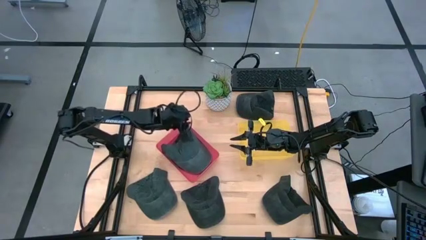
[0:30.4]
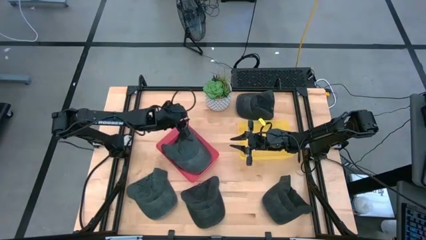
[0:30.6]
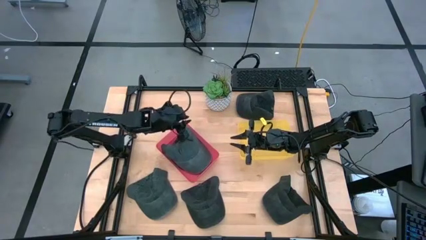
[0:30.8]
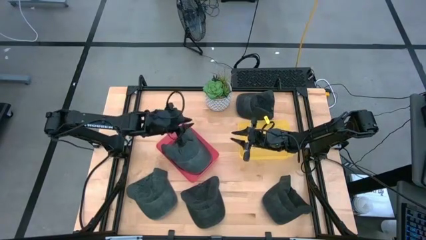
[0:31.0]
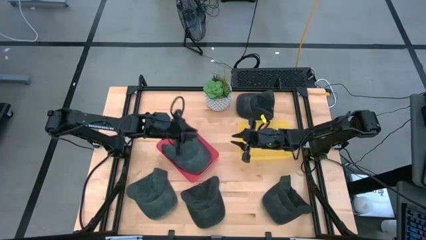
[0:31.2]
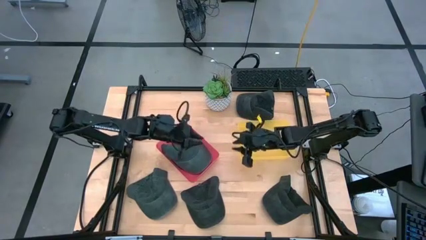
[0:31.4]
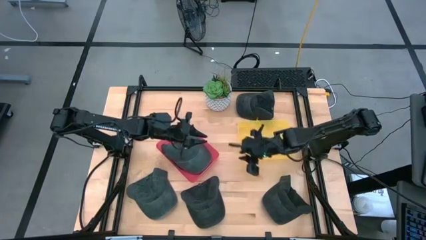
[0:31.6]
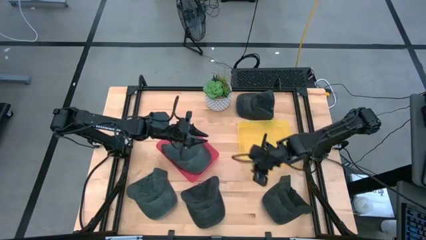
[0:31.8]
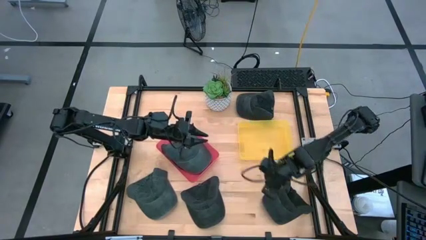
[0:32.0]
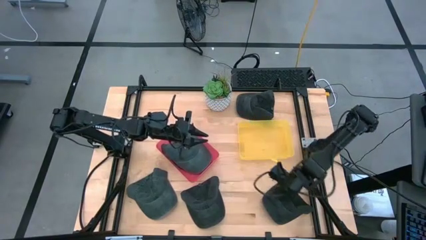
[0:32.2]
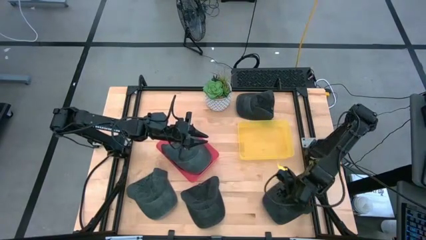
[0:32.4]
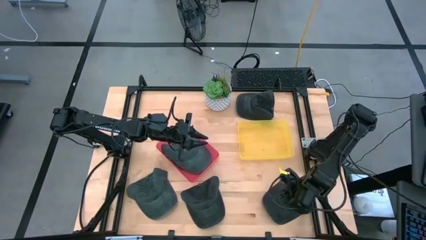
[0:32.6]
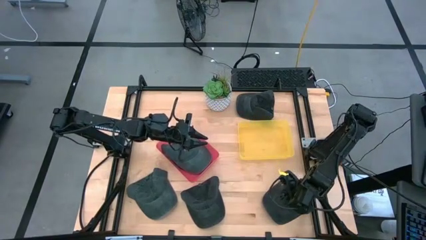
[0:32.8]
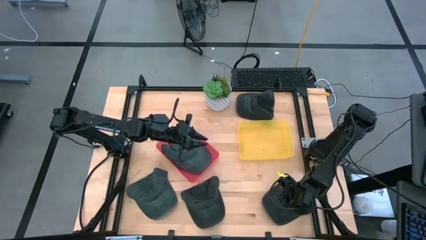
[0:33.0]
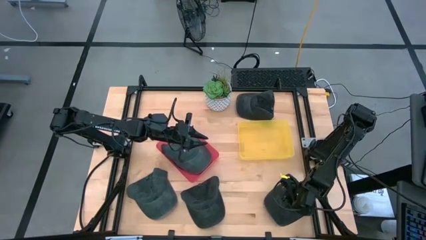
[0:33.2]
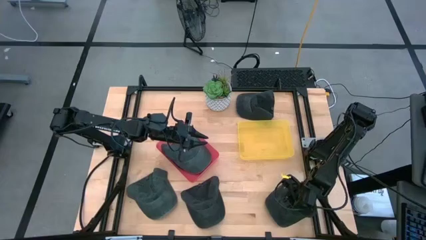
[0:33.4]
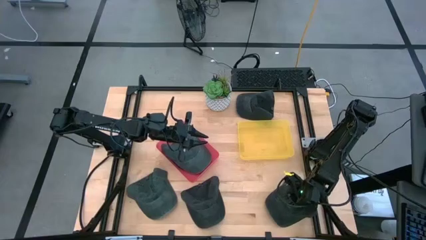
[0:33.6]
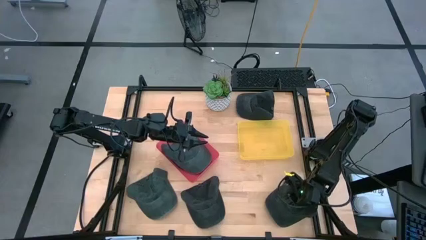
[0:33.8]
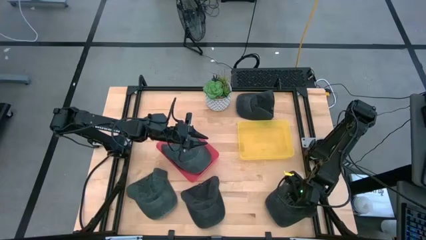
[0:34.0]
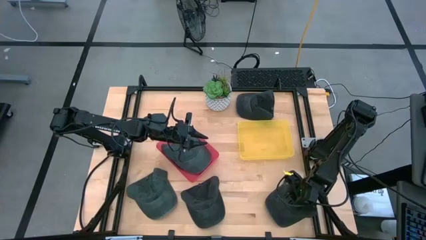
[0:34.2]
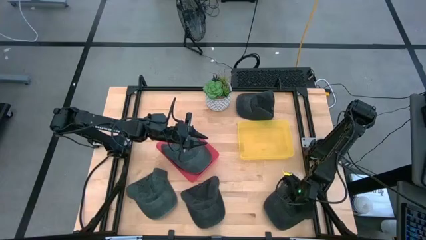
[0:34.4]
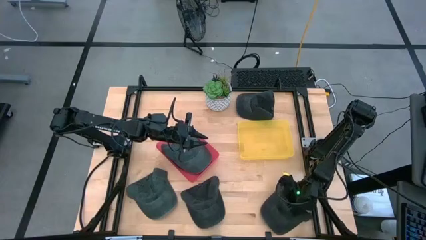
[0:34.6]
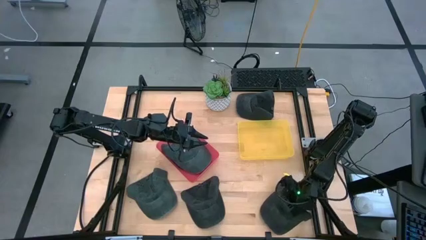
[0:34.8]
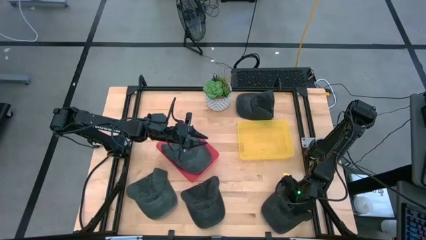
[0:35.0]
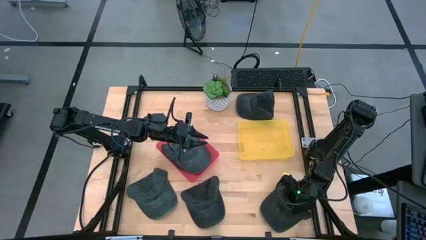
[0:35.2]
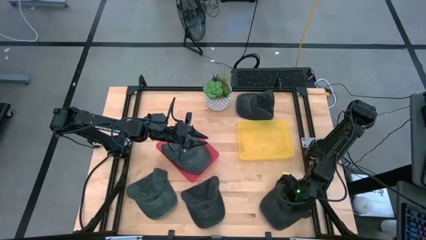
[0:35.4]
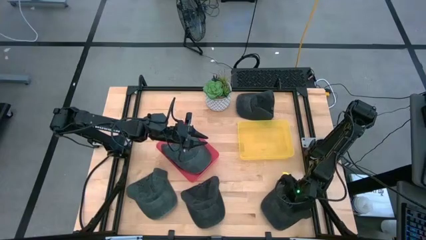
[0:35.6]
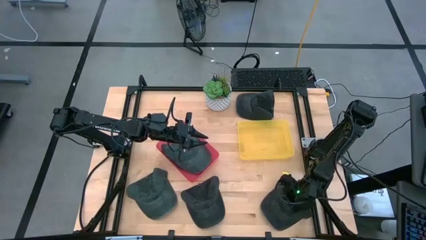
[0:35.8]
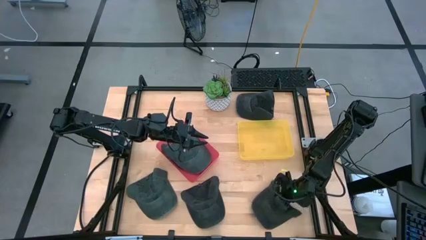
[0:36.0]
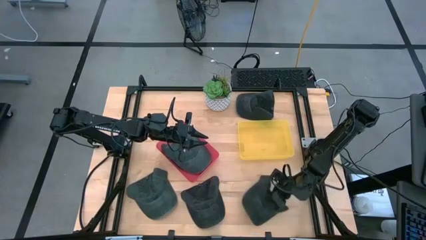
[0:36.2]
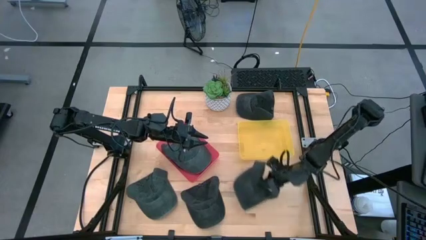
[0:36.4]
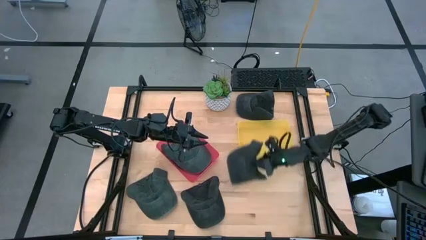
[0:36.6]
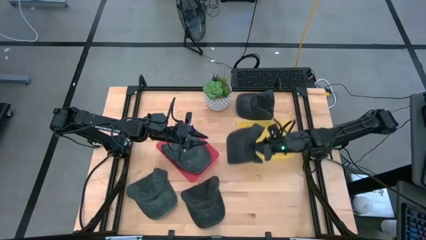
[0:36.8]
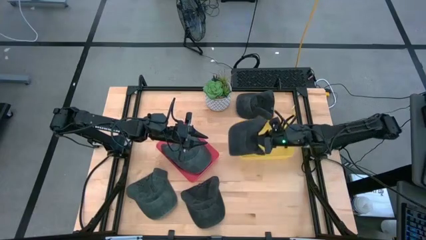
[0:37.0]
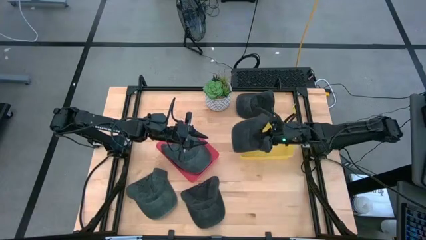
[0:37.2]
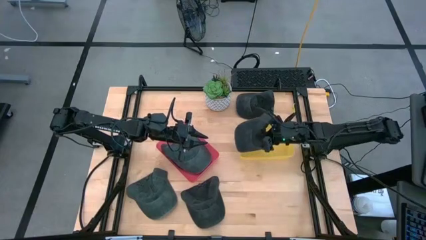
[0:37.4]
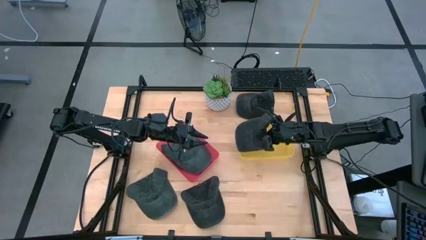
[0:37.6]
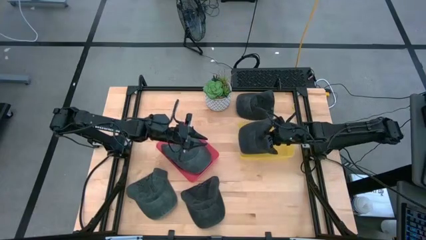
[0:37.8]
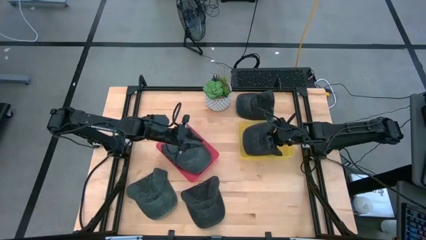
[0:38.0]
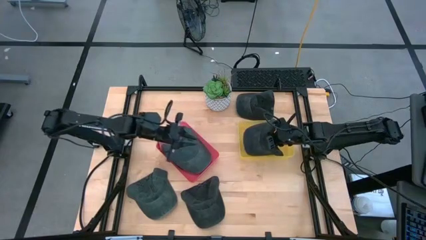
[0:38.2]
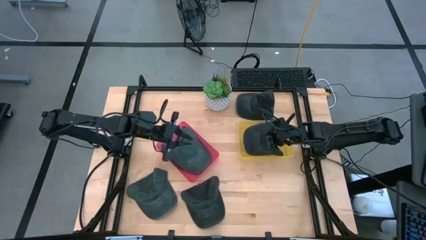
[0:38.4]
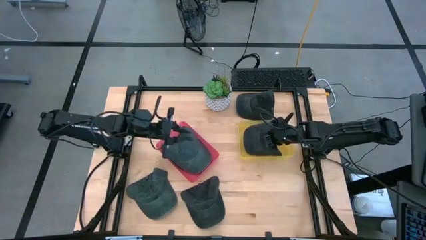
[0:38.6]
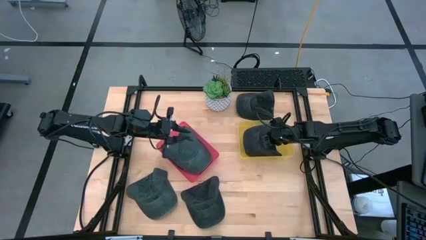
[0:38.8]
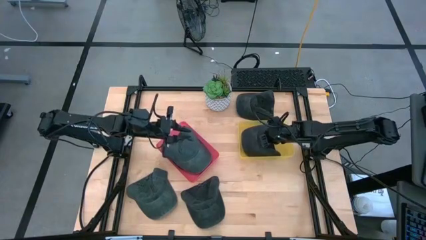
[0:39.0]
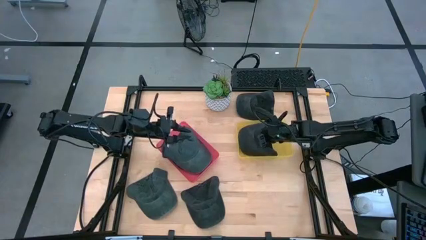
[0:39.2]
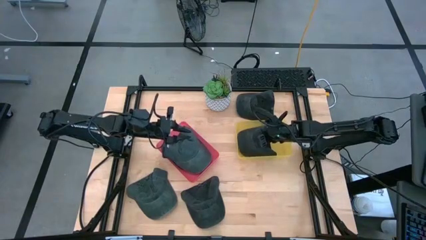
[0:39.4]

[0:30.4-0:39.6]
Task: Pick & Place hat
Put the bottom right black cap into the yellow bin

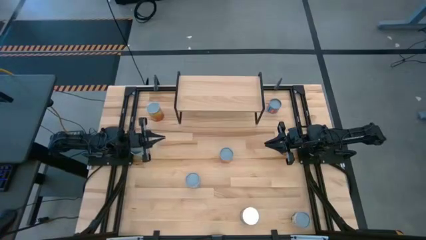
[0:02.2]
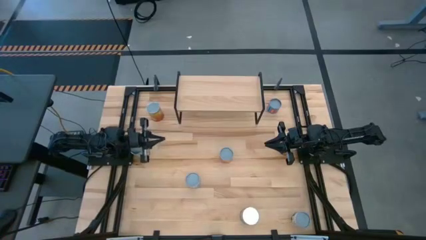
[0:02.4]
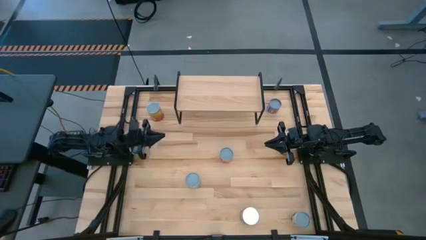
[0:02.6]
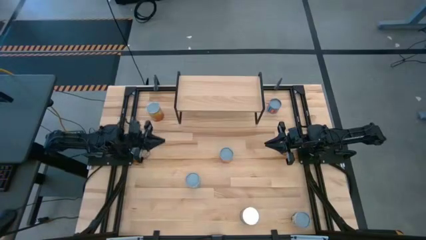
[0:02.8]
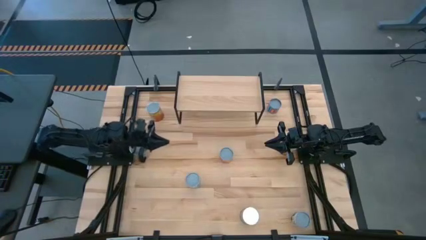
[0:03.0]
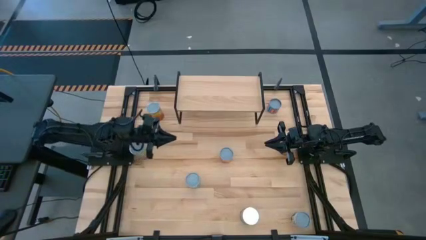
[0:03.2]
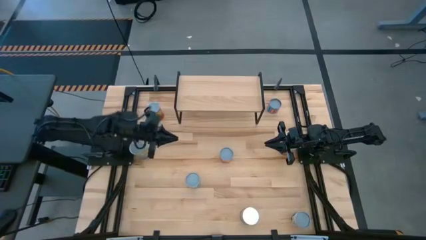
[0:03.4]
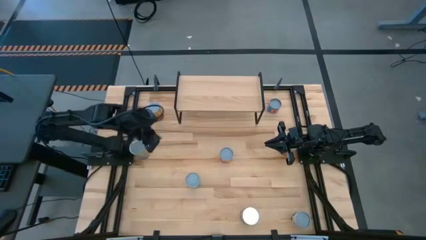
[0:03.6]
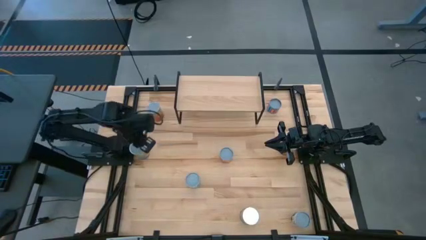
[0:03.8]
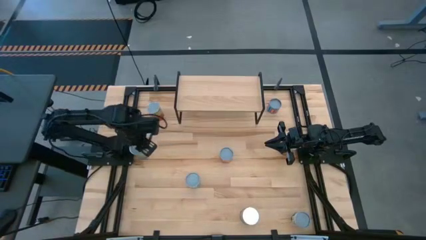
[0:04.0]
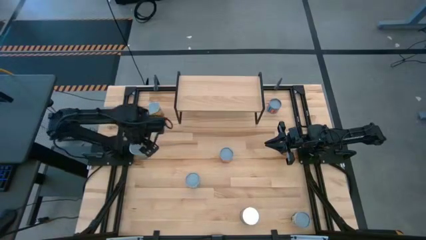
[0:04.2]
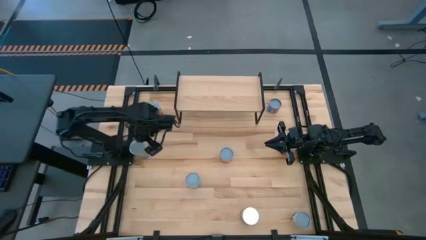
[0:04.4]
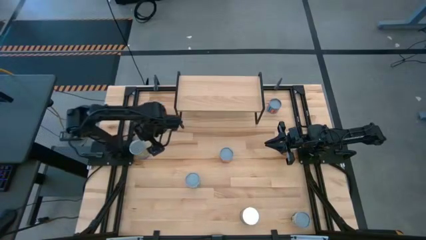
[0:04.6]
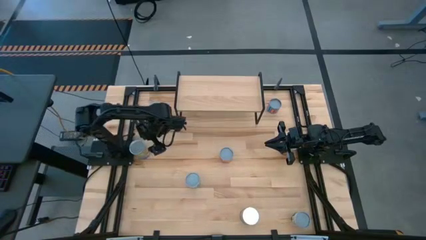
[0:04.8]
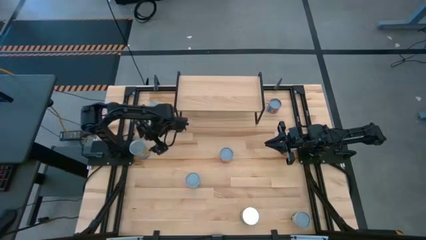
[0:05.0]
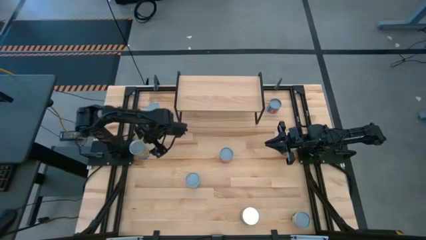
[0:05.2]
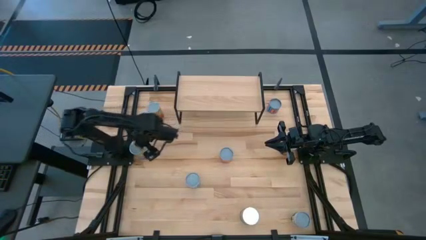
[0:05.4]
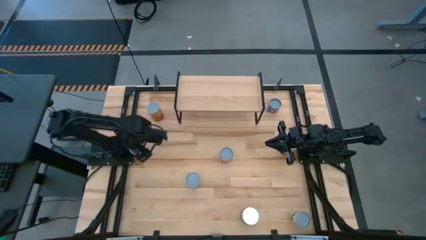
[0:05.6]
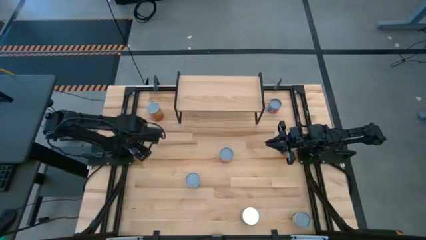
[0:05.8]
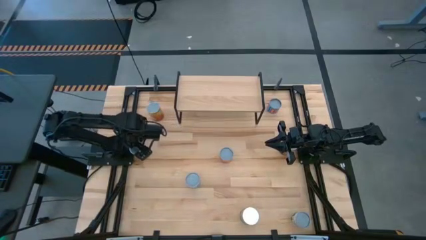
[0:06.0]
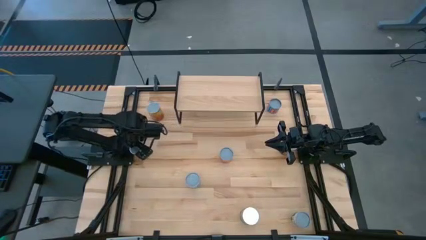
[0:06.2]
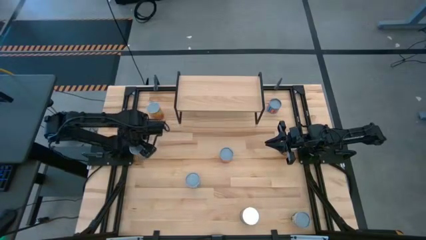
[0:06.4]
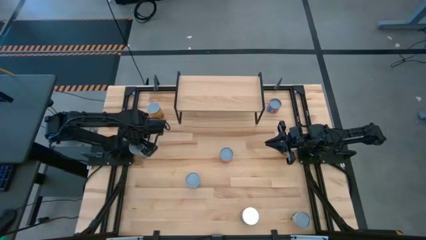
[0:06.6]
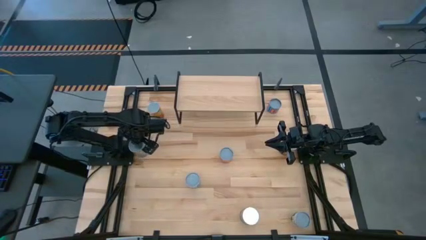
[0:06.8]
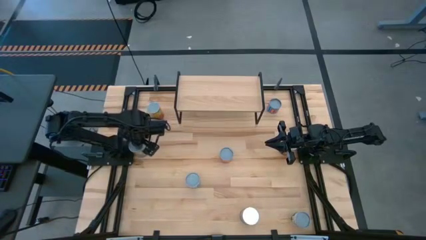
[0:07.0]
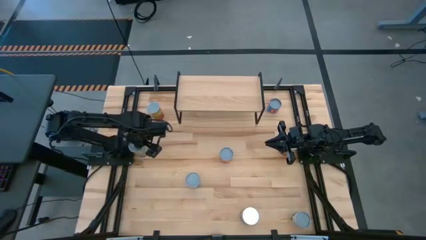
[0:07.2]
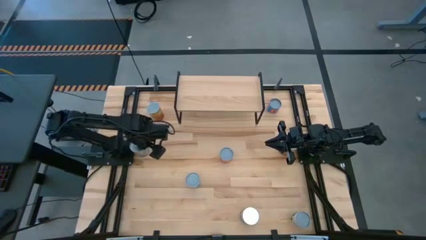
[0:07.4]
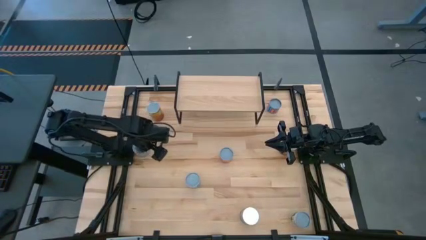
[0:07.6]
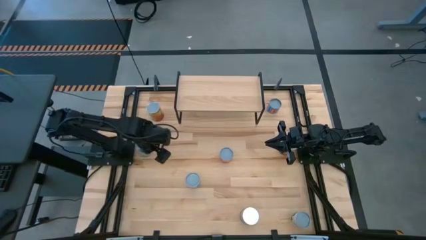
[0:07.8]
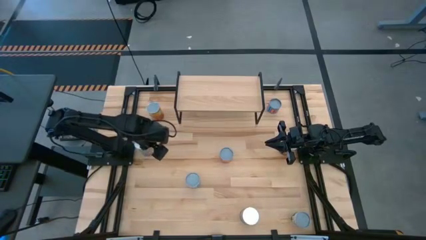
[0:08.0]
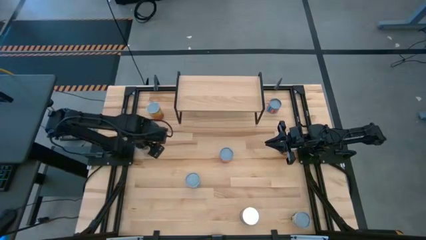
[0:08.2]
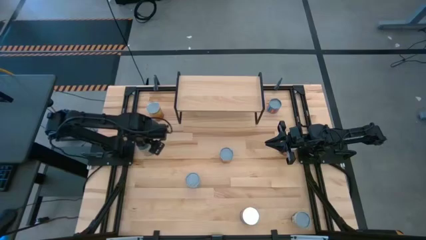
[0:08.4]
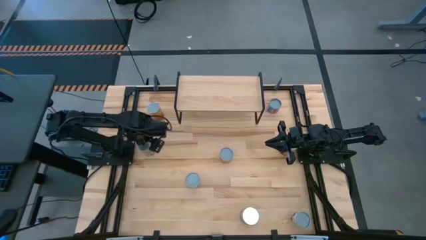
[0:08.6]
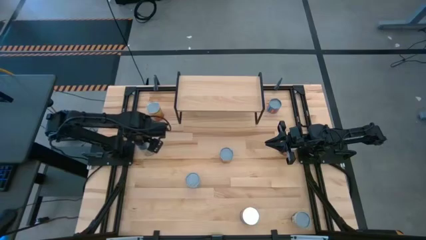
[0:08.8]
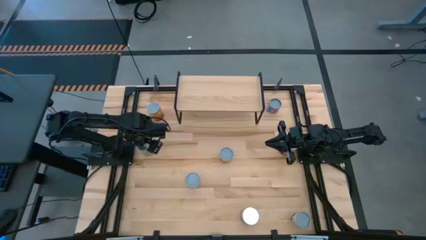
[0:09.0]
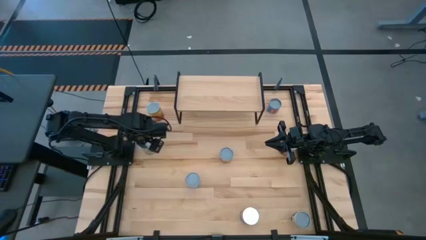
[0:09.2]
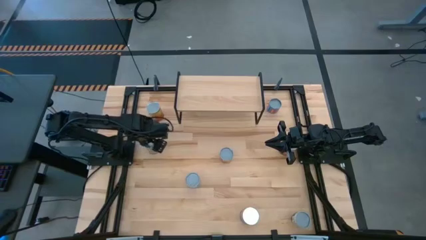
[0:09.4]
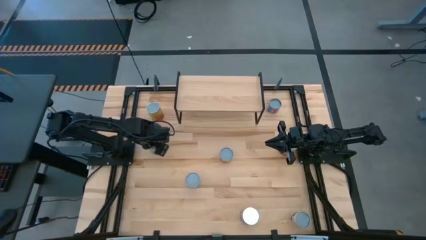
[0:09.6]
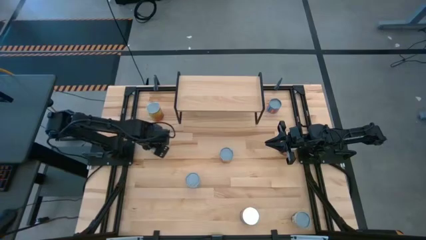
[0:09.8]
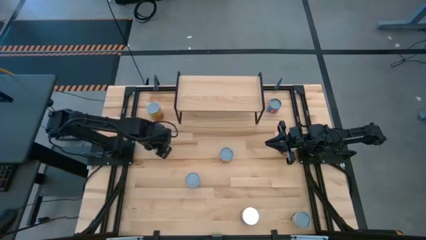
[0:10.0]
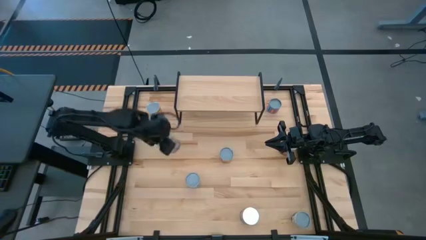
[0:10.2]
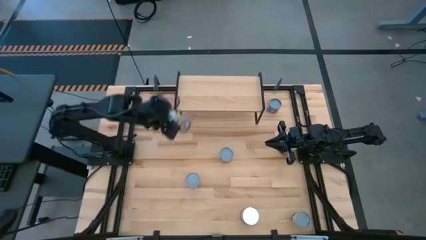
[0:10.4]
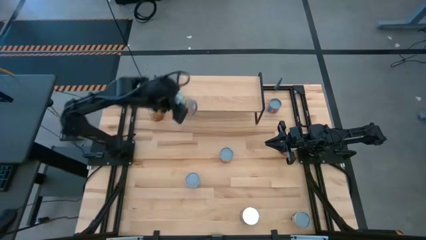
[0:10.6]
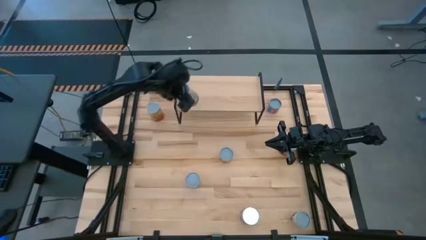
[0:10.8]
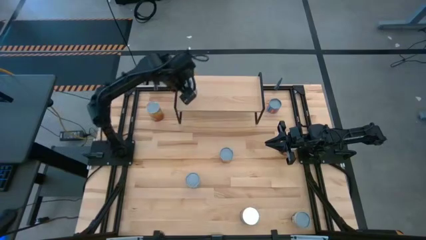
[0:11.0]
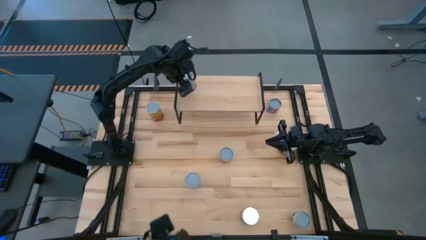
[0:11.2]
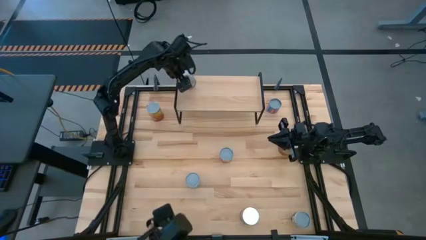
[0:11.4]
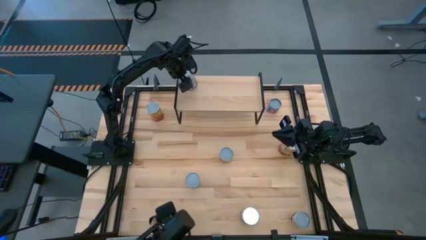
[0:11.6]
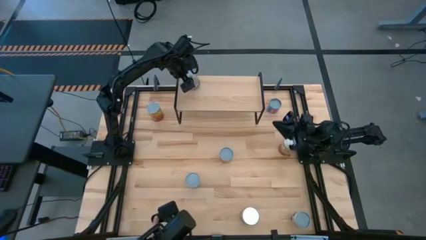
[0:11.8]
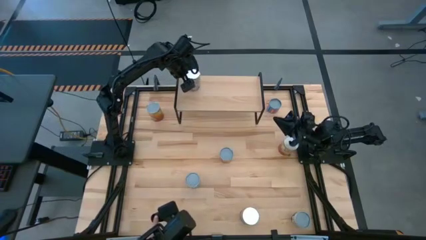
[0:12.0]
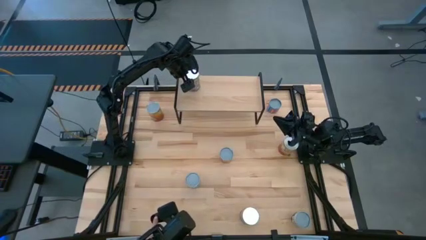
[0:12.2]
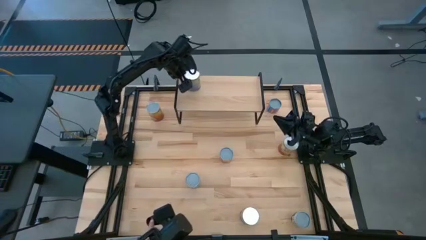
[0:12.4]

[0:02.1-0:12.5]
Task: Pick and place cans onto a shelf
Put the top canned peaches on the shelf
